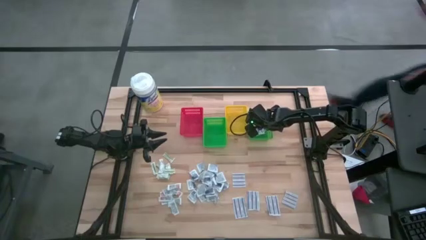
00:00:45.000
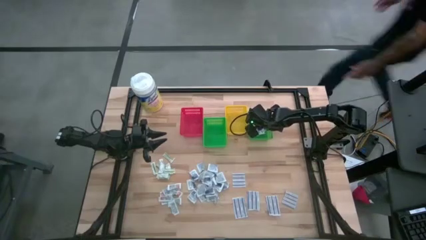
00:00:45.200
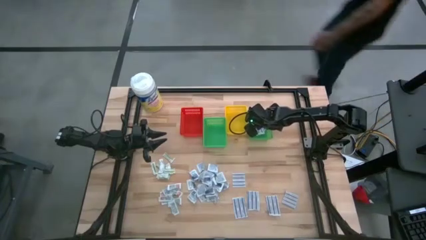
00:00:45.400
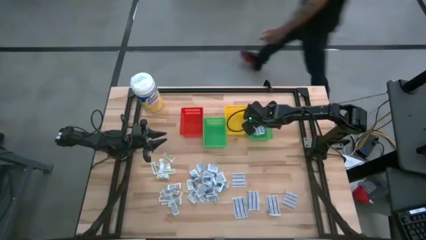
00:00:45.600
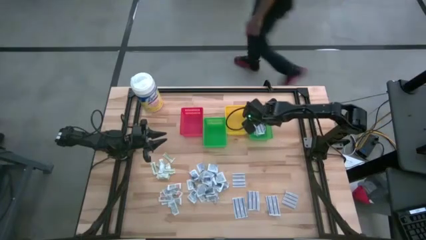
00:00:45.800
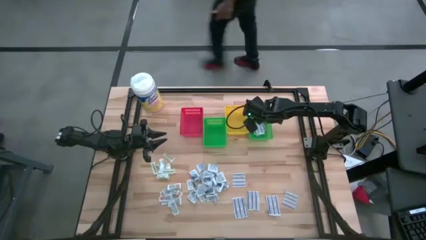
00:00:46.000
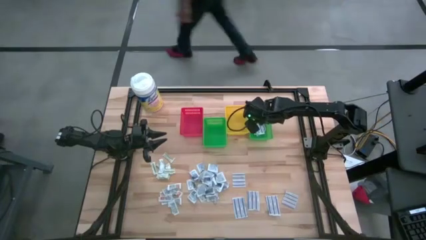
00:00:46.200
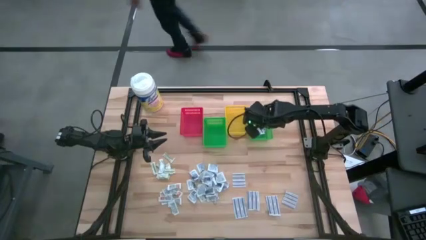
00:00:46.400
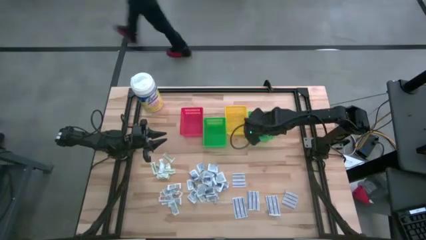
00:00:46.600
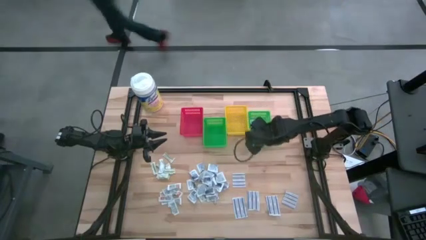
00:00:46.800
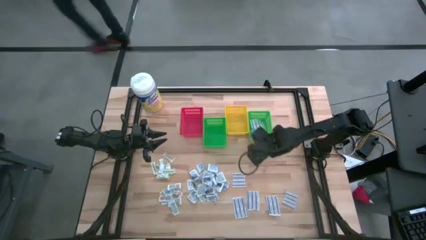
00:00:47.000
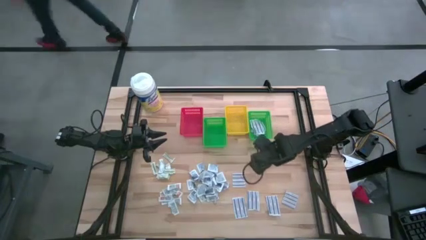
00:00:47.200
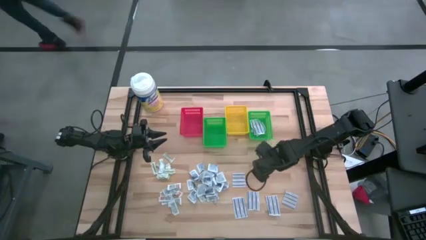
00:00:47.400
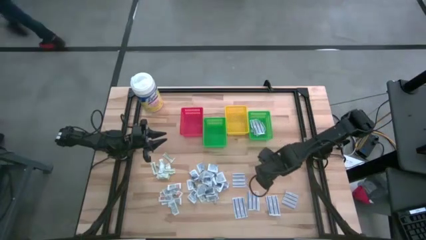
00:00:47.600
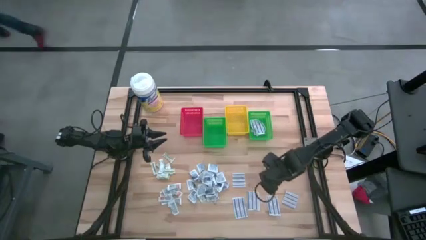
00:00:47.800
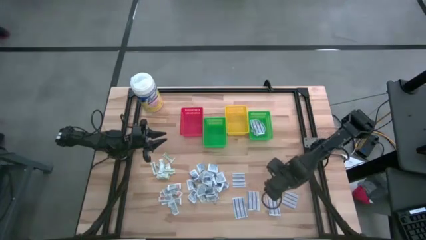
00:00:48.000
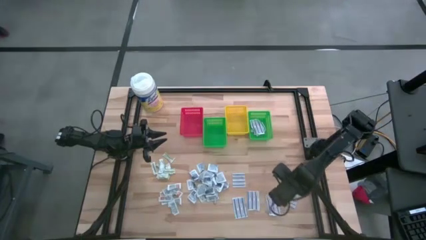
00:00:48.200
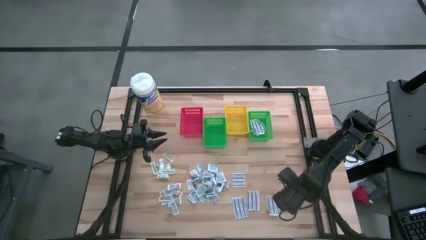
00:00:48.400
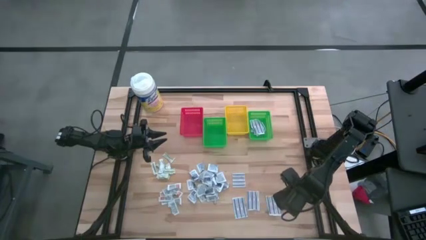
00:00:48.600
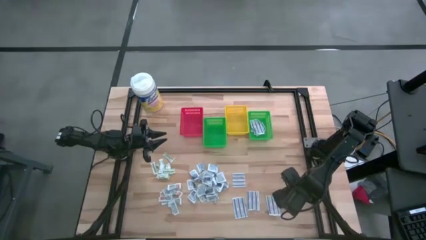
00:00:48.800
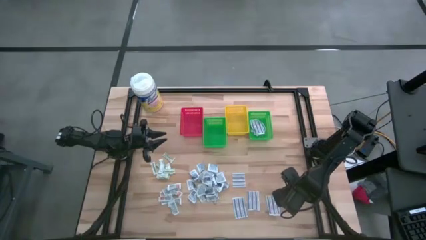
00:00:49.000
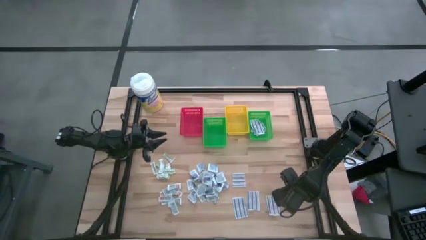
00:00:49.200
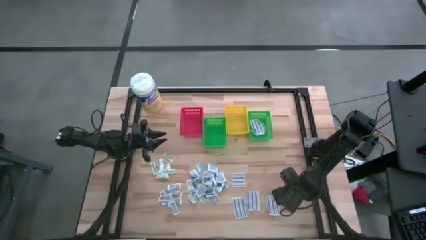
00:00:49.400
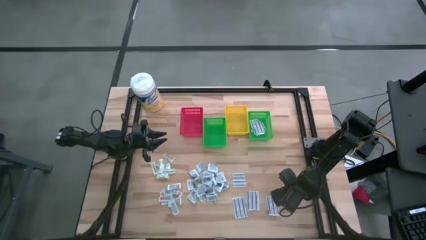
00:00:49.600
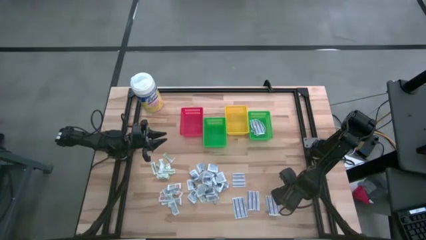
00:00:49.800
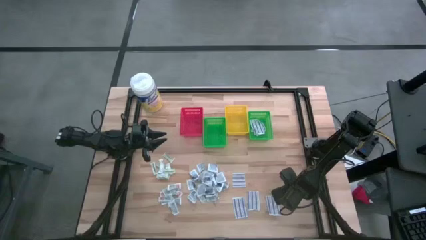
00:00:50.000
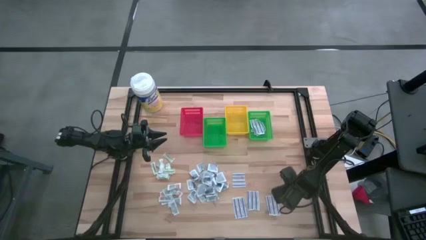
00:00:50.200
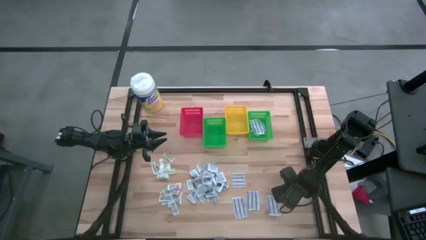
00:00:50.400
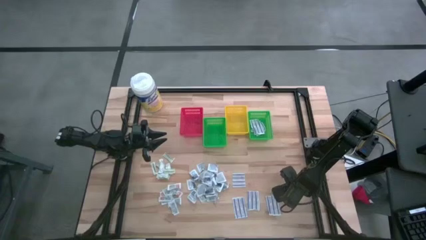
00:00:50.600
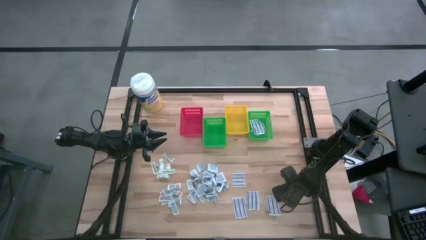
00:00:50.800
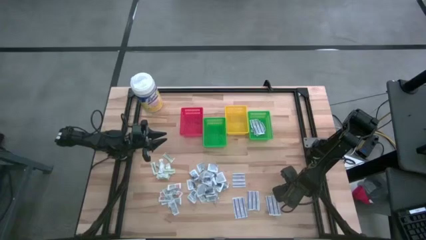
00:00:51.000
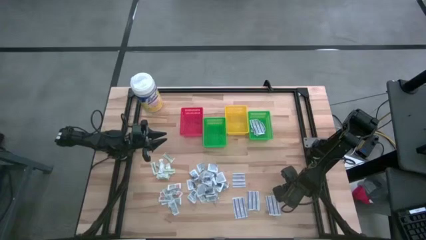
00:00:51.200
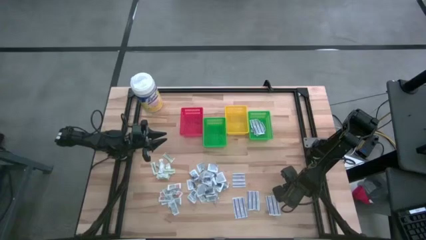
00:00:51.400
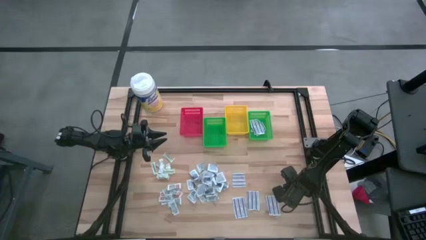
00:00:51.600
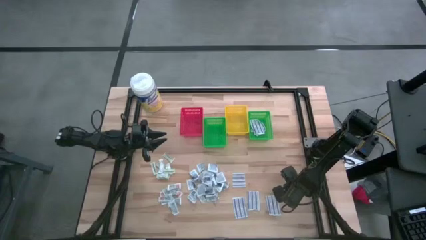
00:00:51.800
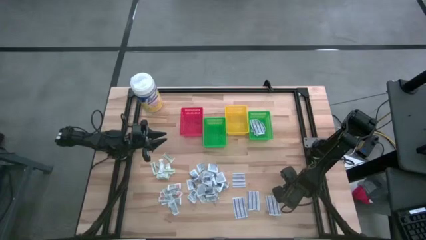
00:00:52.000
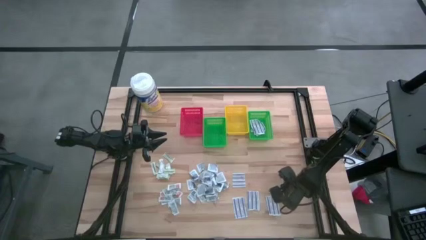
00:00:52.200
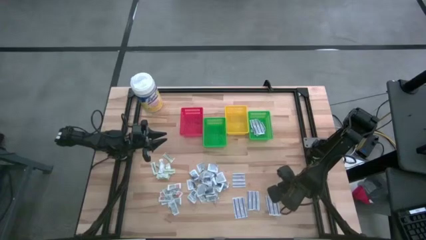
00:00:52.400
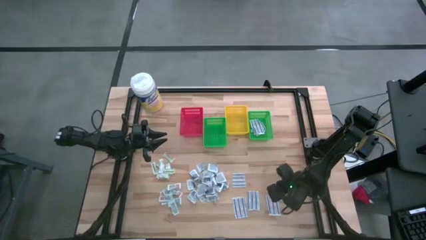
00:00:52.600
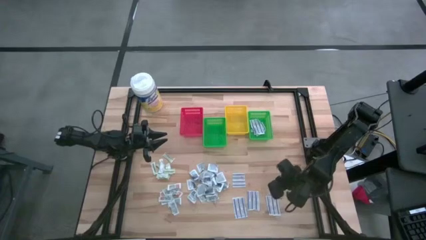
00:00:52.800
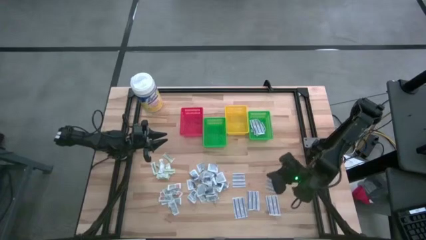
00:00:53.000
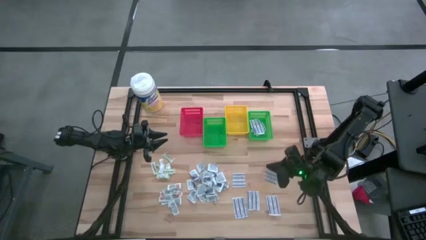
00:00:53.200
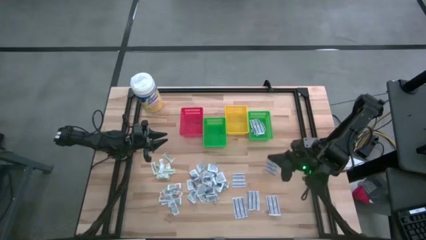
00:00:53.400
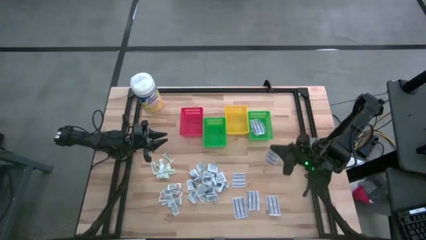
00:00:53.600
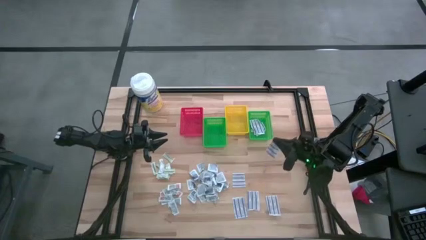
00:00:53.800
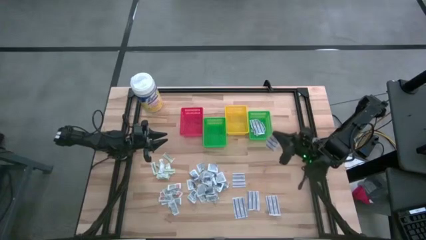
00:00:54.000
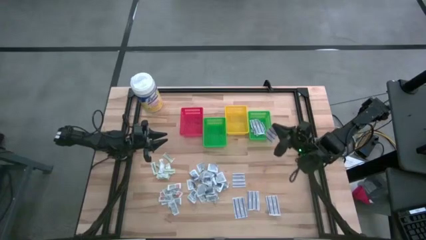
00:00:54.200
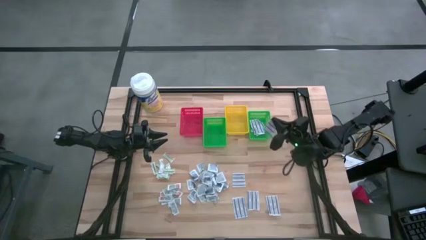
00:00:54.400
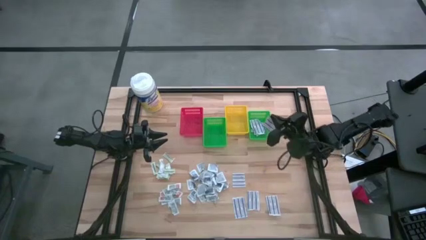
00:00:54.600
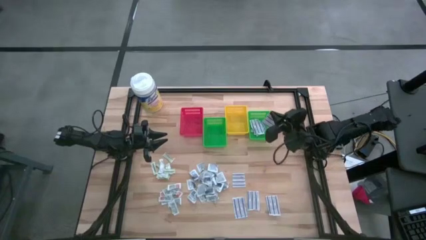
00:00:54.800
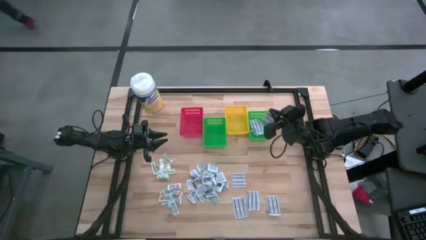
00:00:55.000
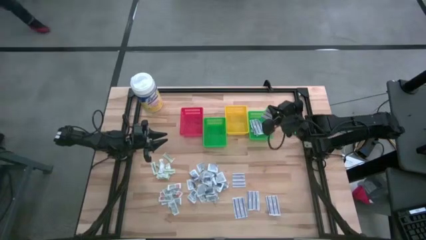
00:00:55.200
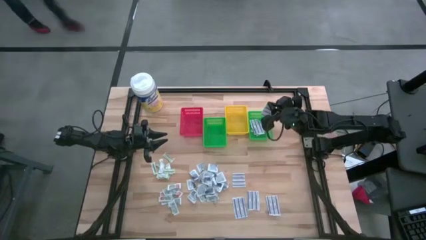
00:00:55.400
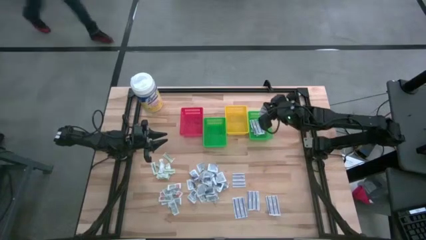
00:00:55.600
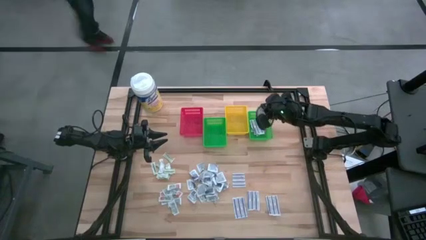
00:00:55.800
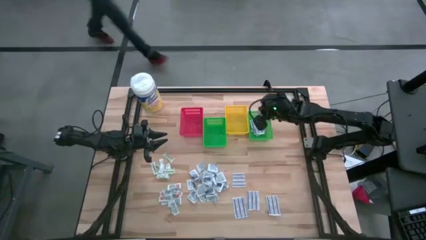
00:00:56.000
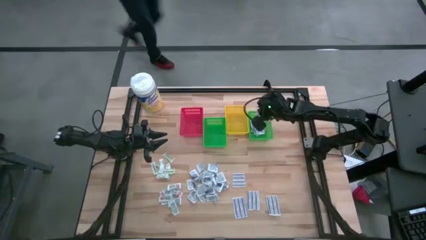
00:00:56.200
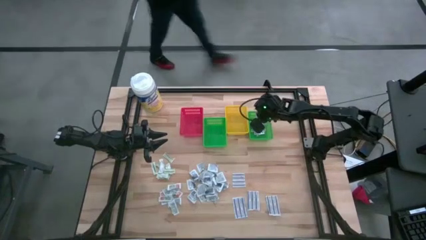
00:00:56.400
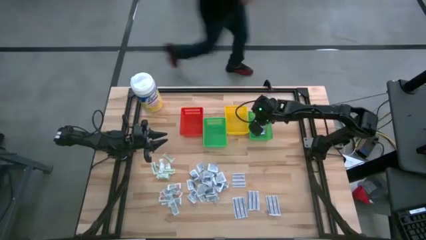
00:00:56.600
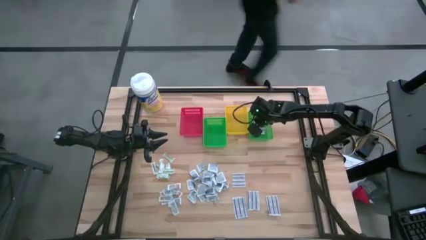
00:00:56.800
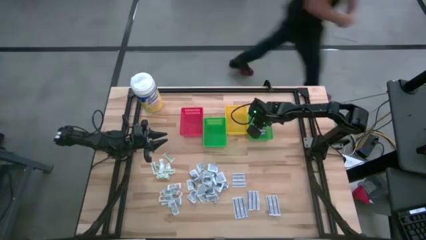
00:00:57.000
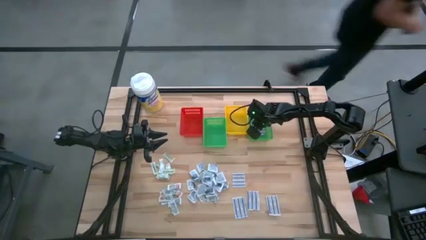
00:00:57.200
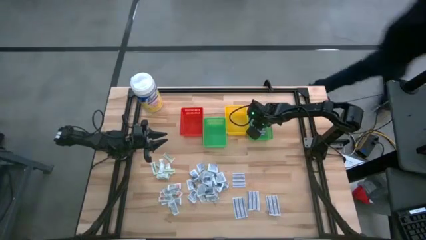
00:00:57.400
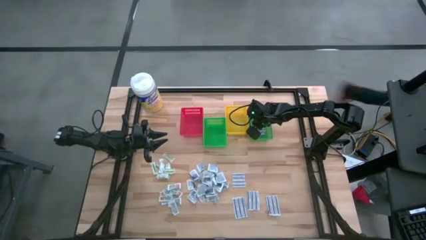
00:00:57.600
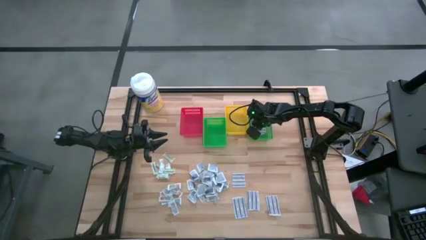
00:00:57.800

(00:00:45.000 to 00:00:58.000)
Task: Pick & Place First Aid Supplies
Put the blue bandage into the right green basket

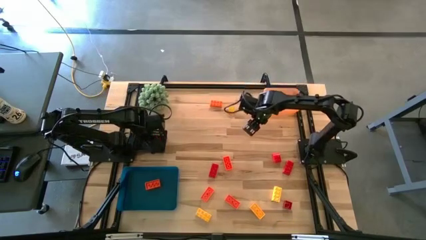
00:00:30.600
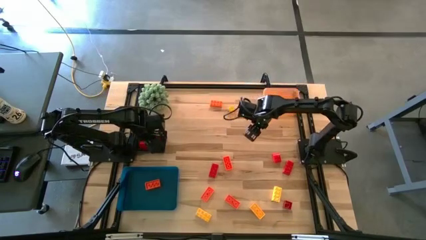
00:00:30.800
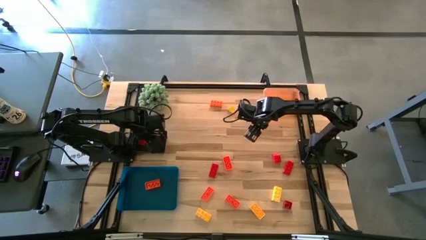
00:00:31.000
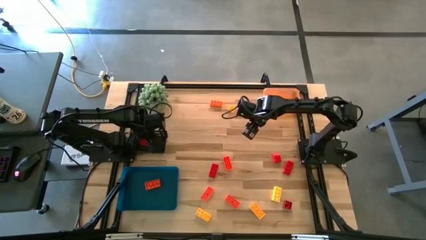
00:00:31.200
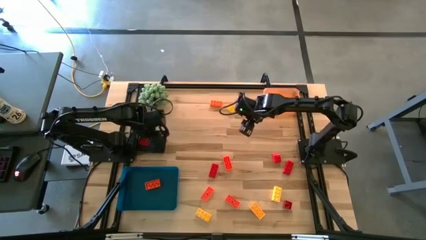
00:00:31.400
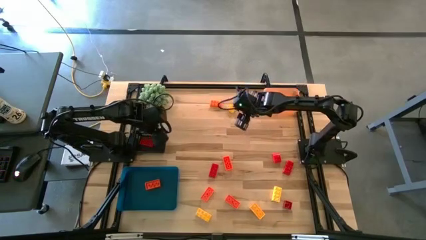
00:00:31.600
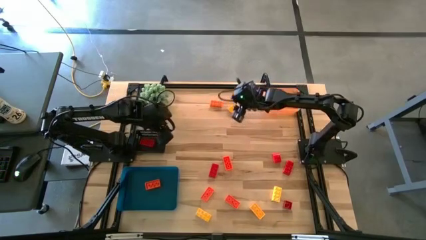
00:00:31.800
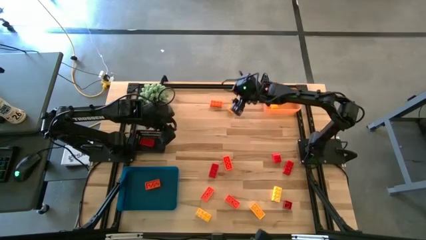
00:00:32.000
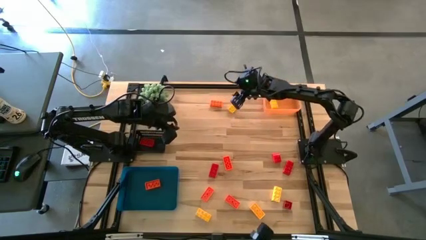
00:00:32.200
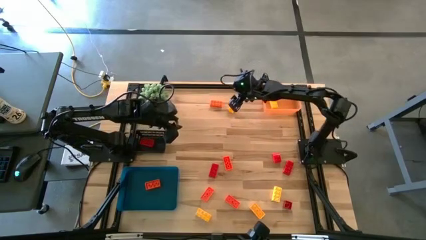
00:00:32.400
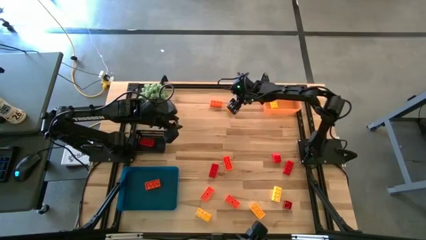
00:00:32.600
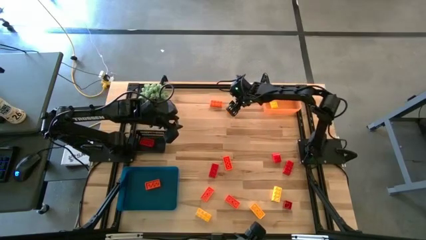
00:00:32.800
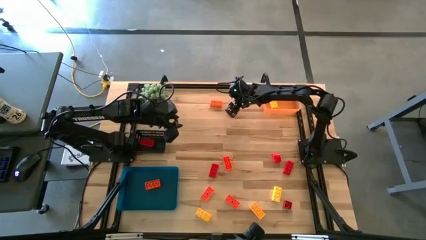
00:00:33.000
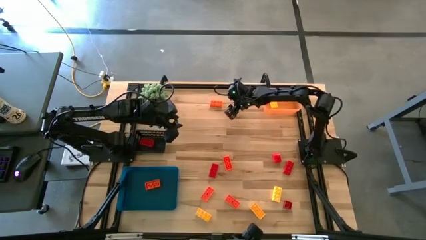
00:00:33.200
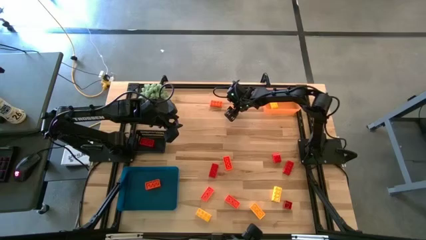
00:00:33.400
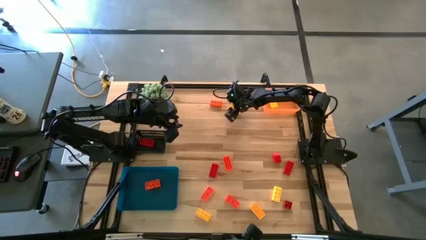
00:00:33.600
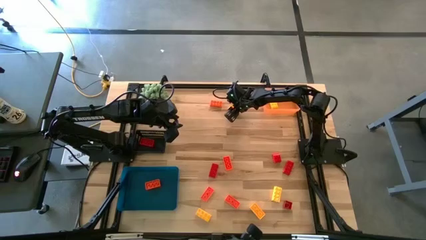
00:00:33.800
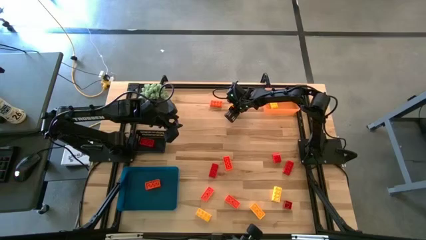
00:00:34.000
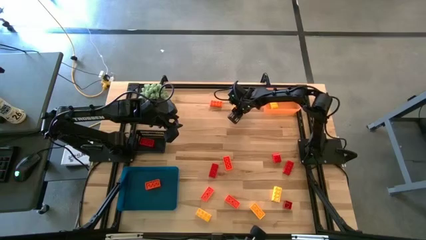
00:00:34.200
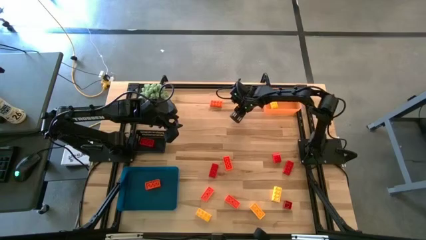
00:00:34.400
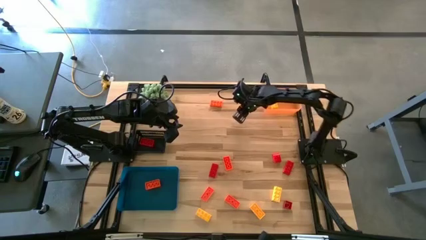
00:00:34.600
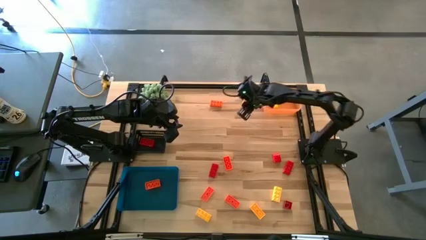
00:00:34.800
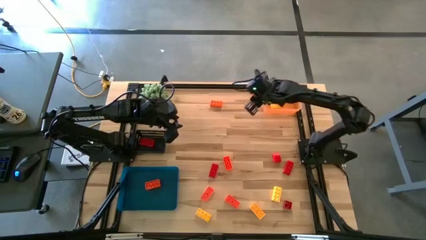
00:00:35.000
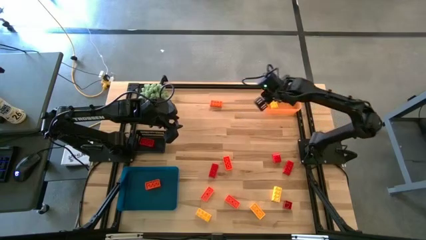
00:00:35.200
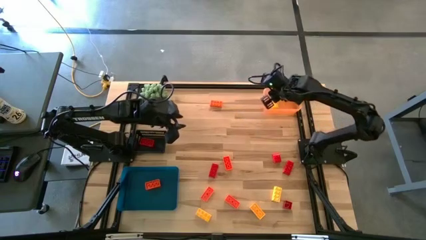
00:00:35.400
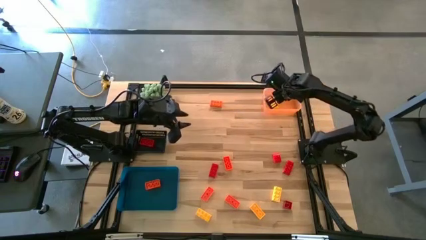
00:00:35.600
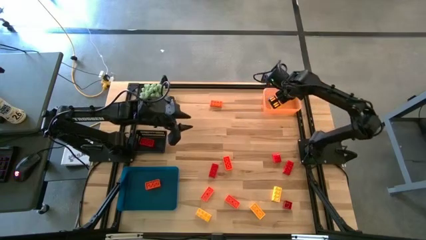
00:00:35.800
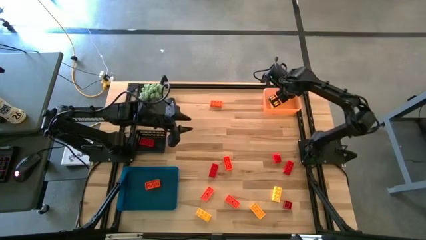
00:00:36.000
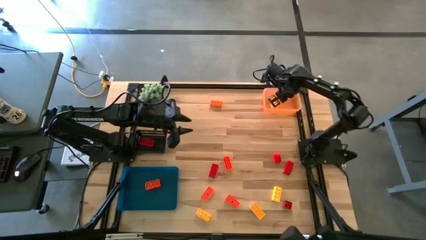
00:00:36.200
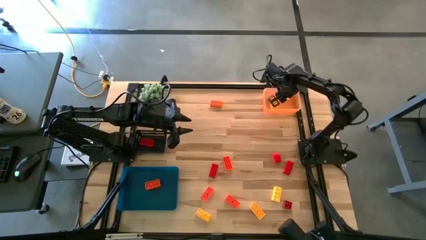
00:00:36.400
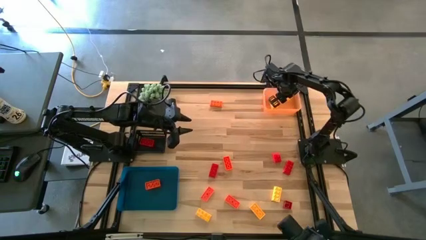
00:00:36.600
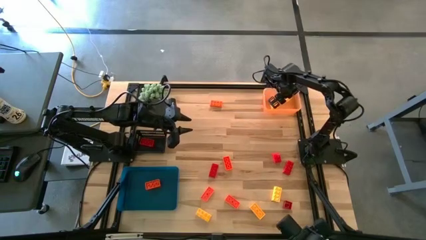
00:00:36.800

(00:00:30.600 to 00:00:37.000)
Task: Sort & place blocks by color
Put the yellow game piece into the orange bin
